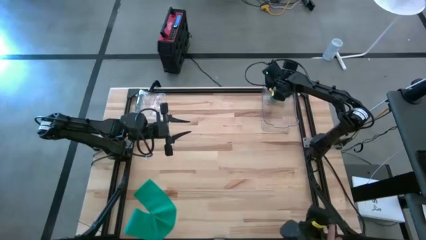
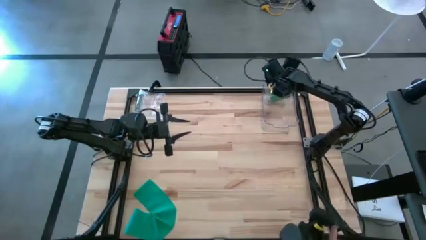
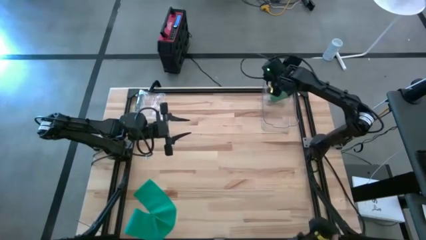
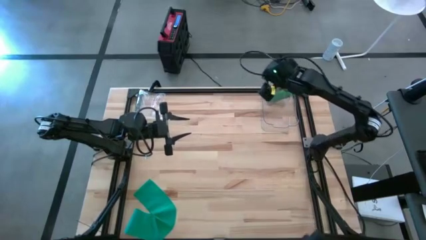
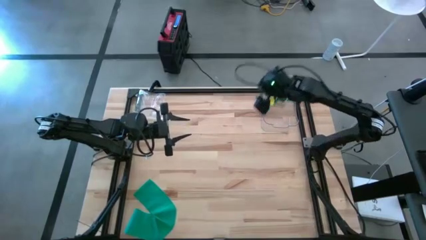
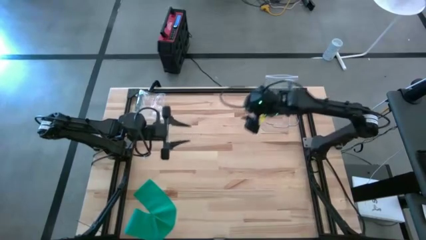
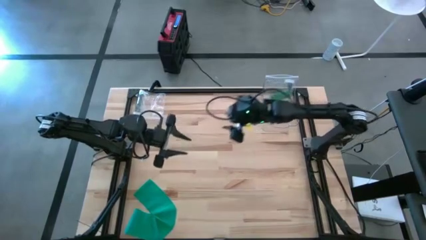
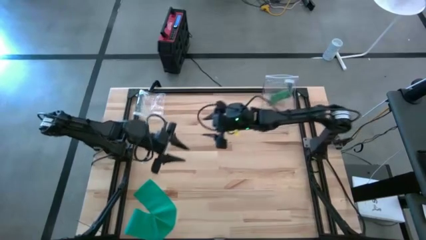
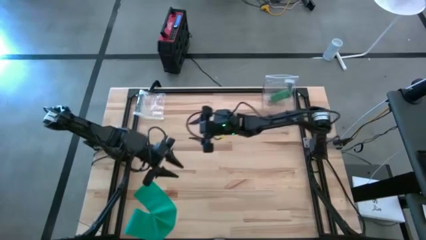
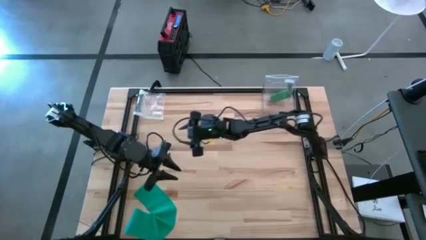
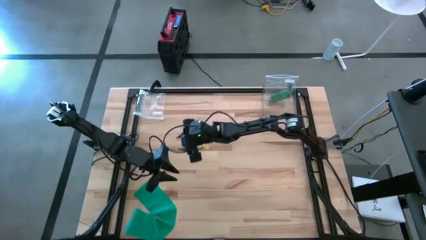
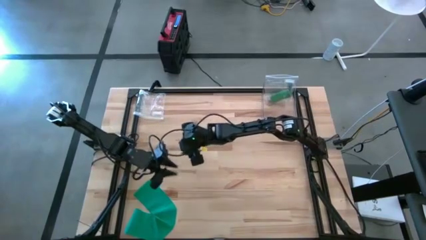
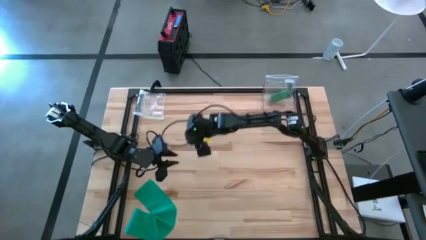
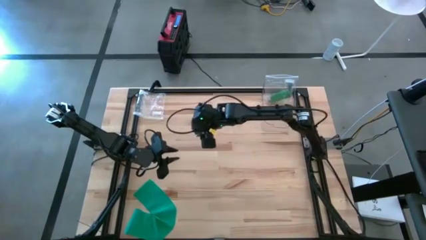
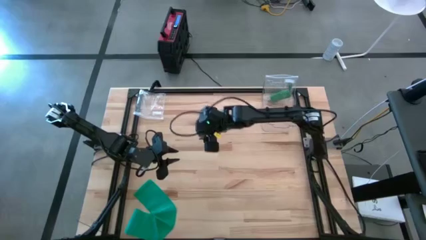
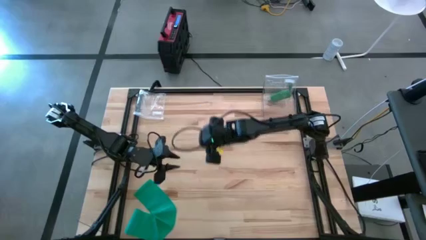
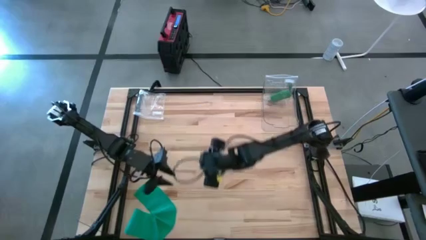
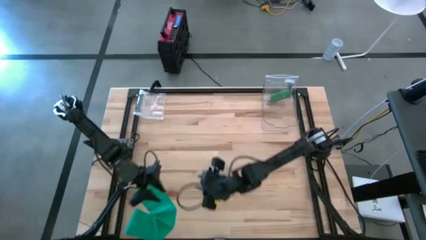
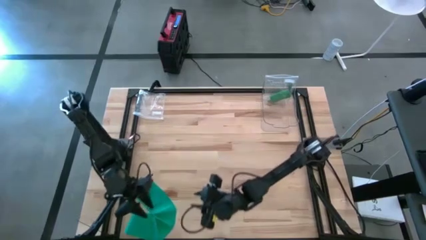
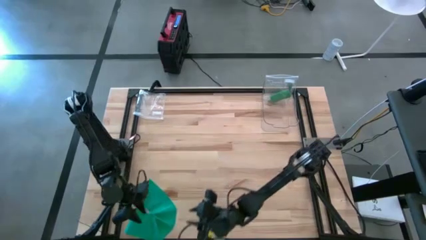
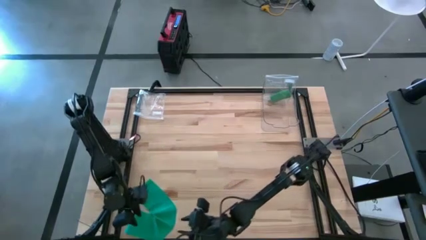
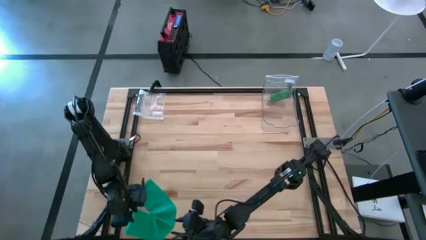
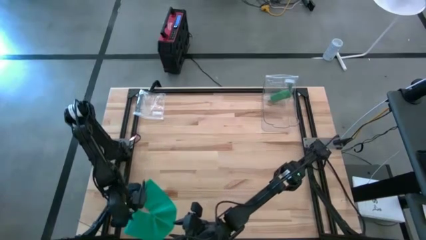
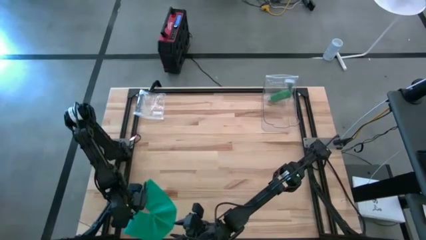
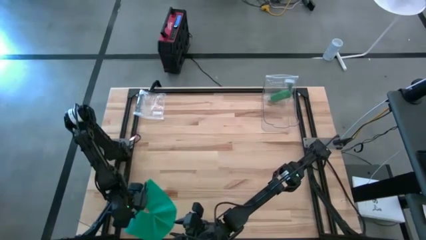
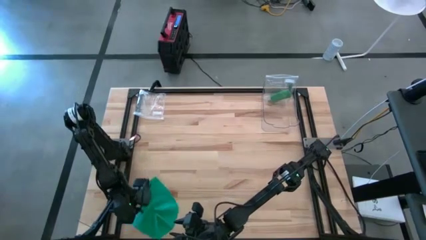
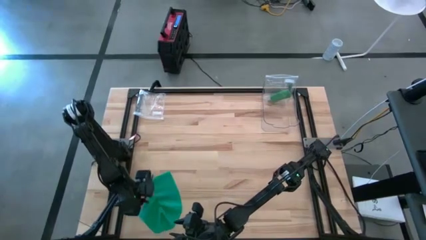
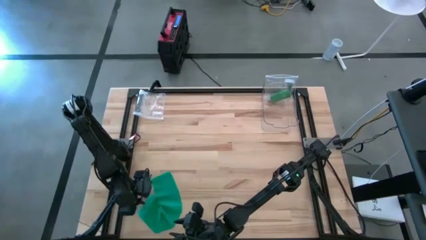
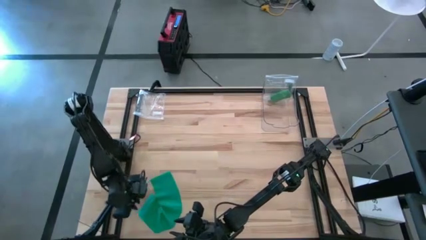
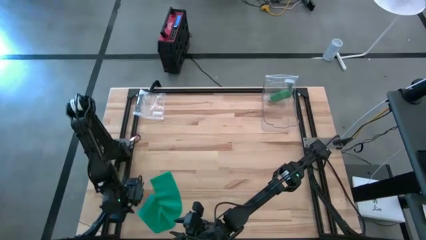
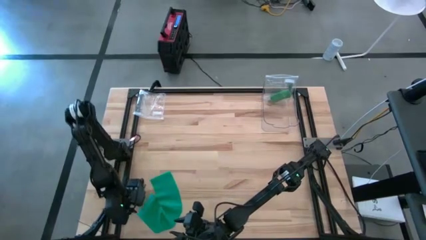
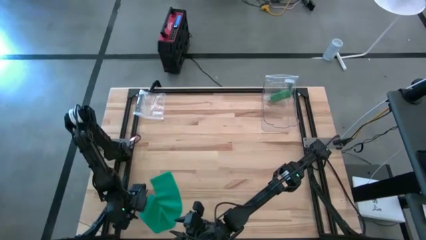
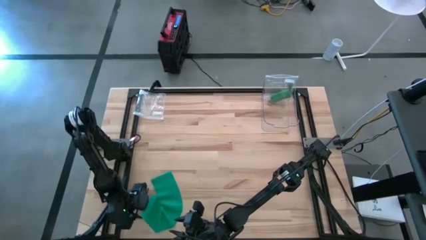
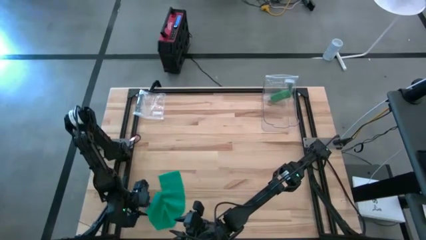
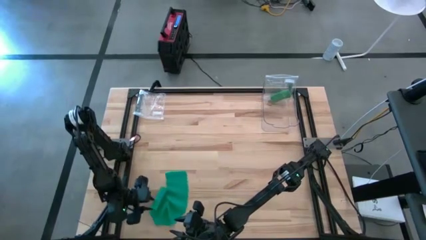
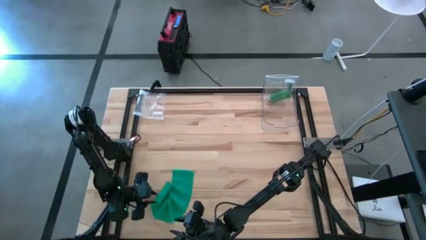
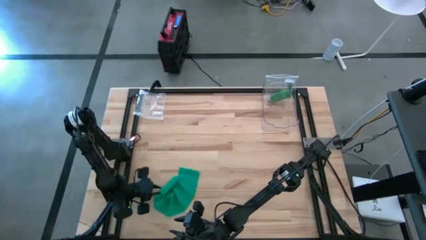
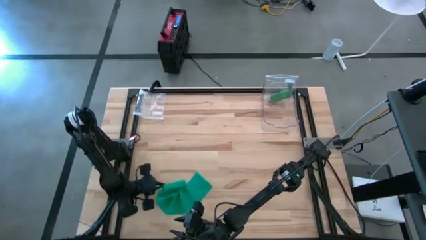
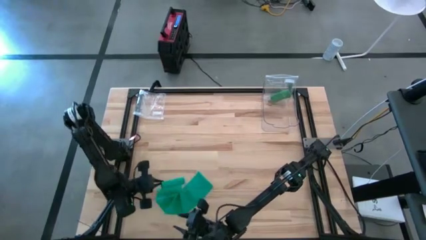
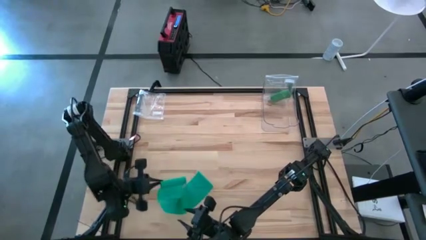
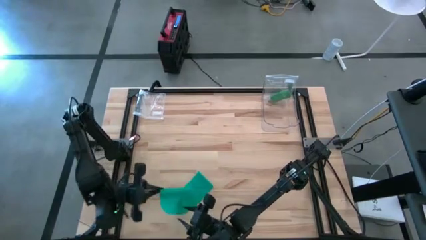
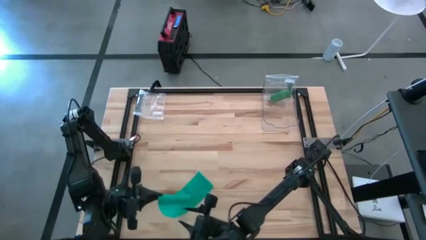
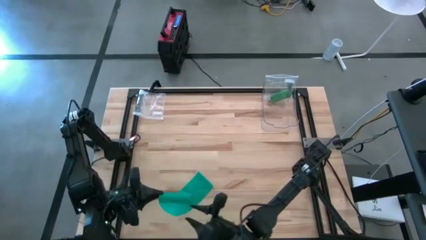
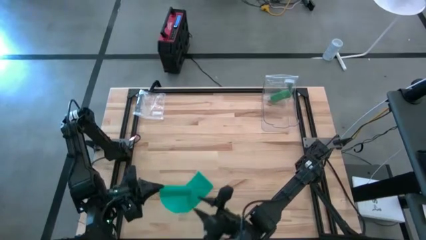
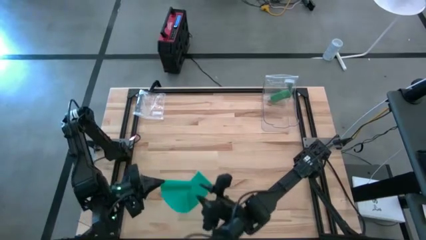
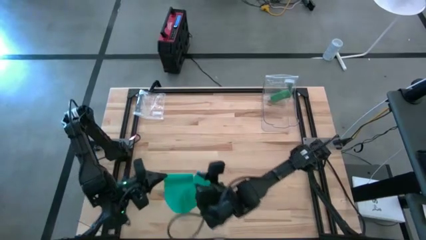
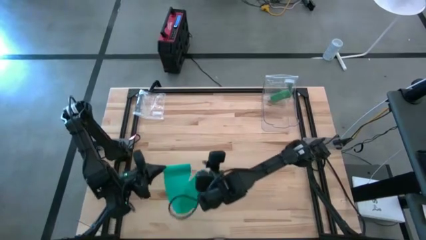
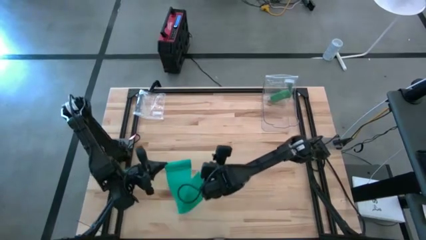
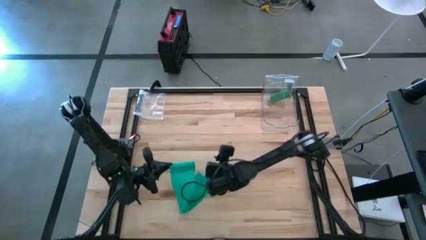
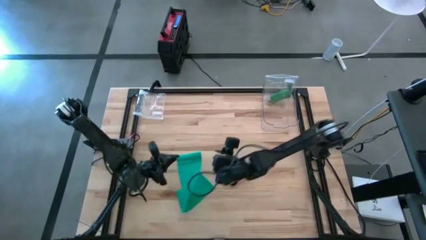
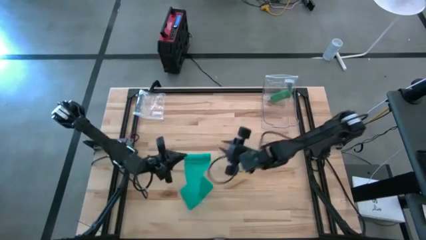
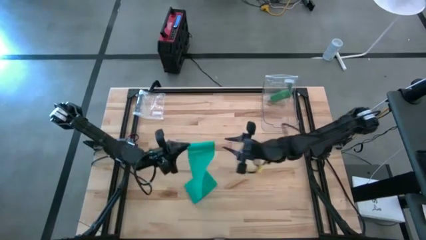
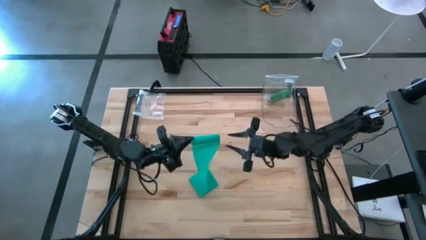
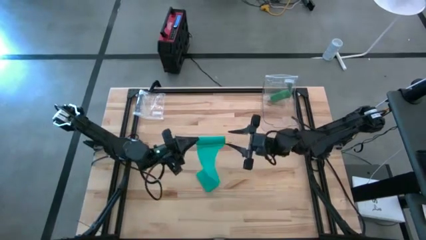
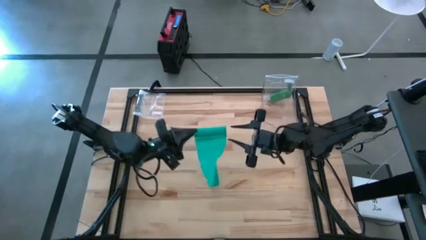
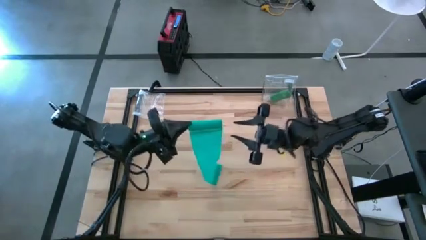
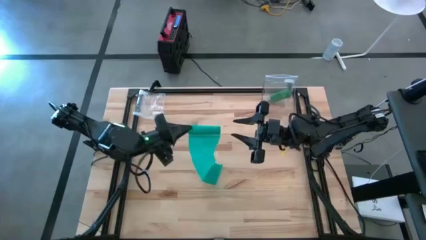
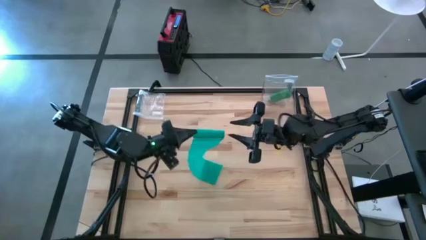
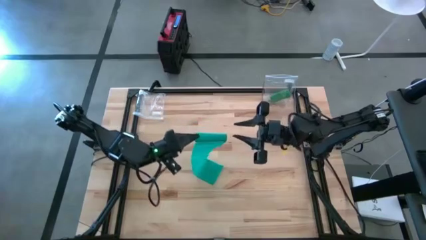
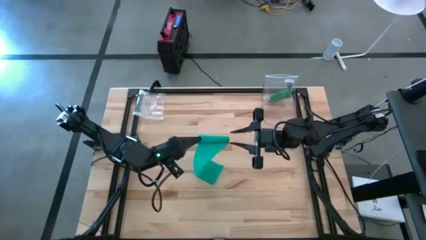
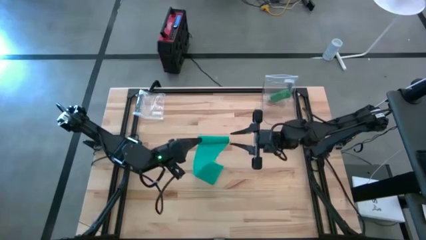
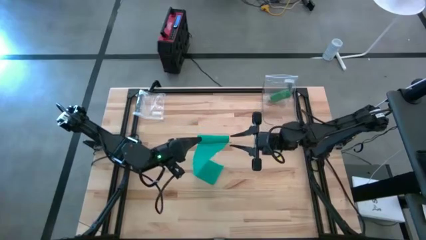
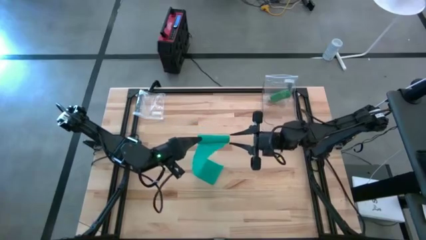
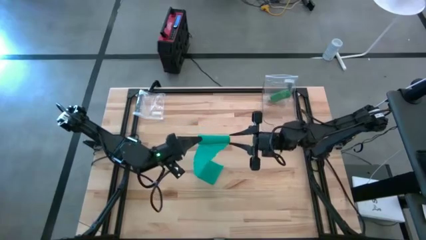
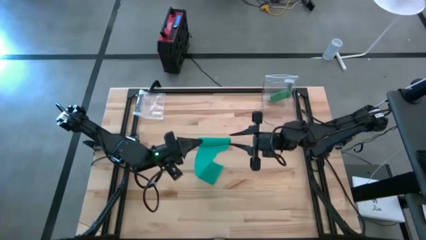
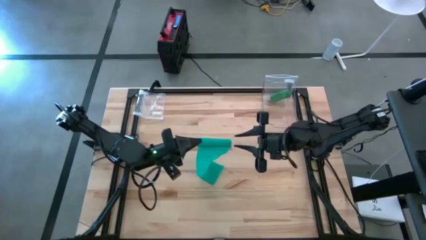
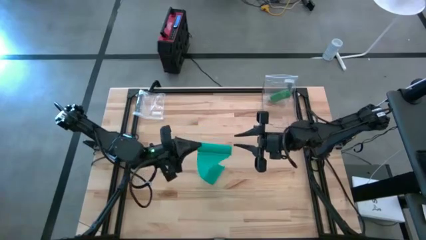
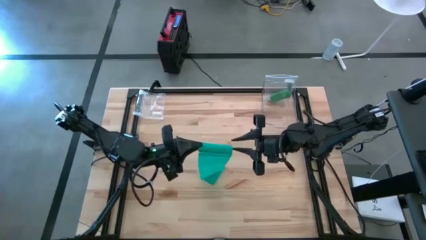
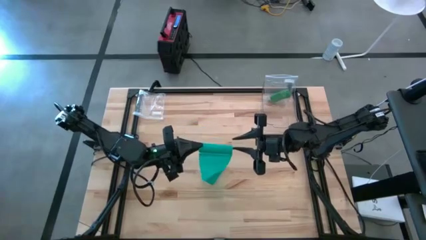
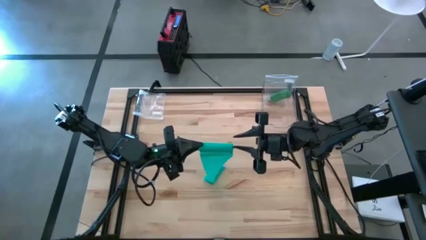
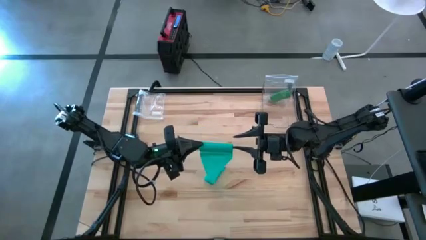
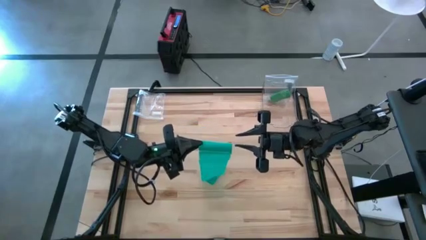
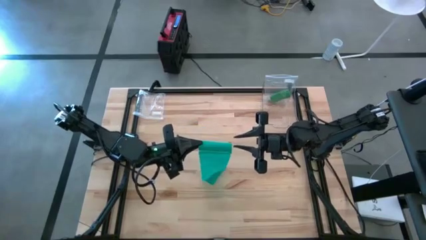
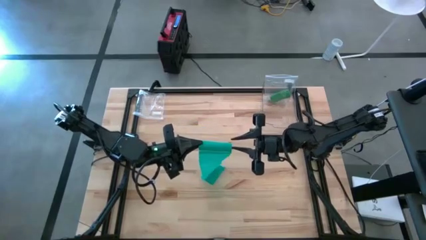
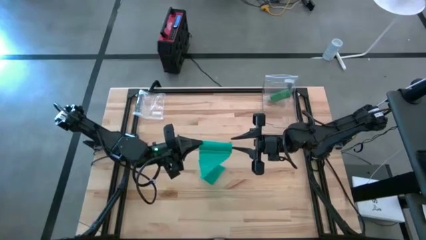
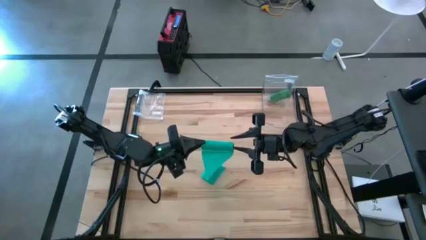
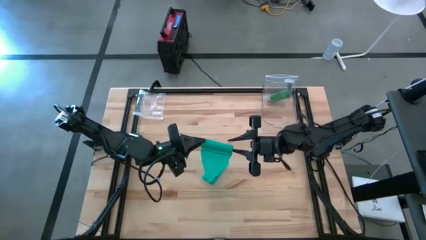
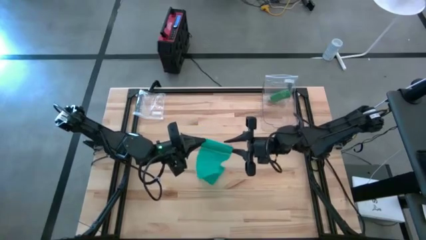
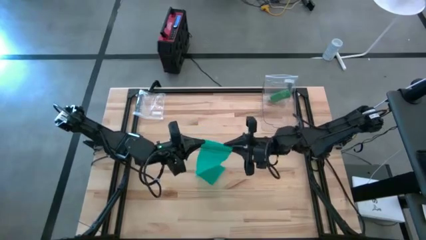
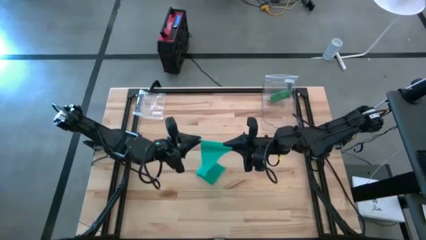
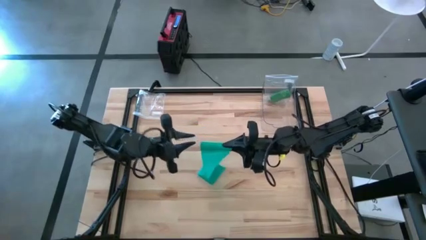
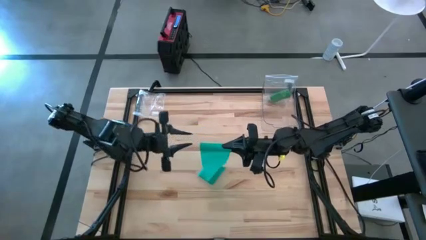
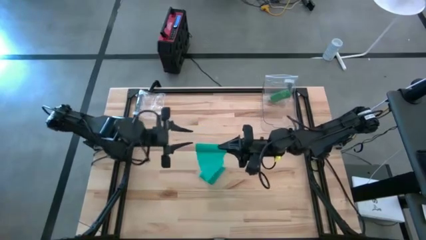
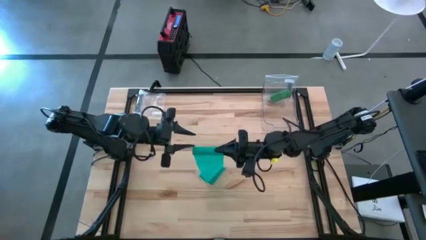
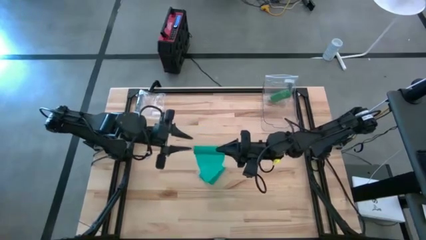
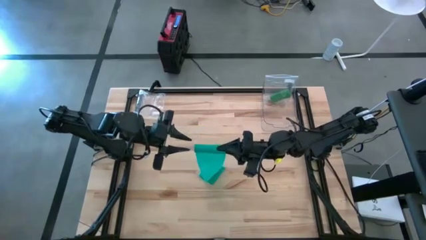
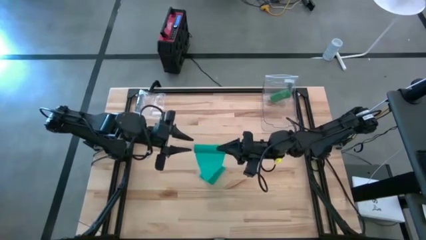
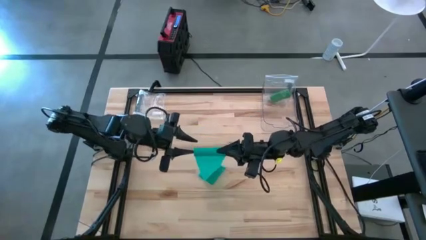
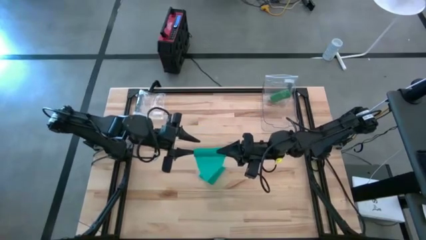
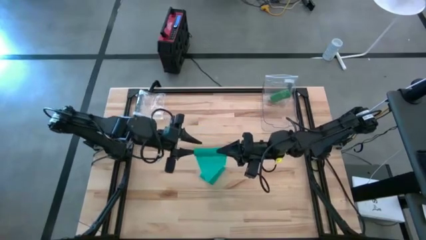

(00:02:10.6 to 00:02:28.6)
Task: Roll bandage
Roll the dark green bandage
